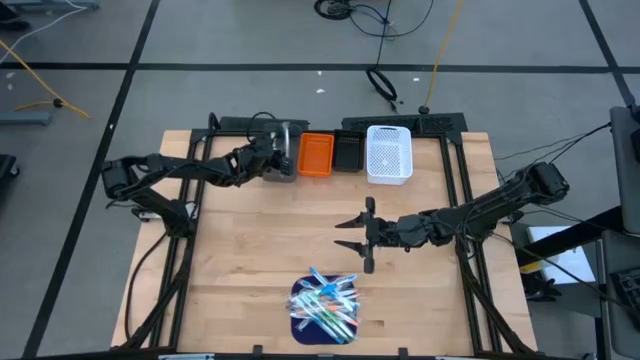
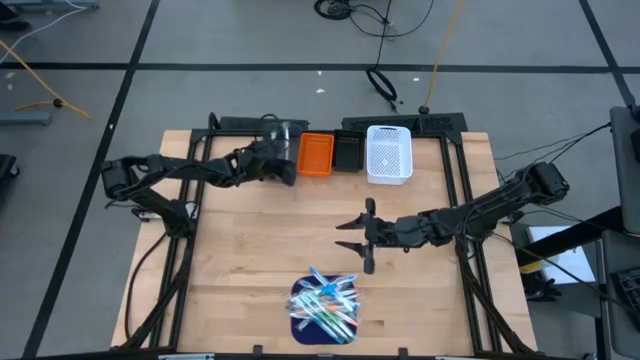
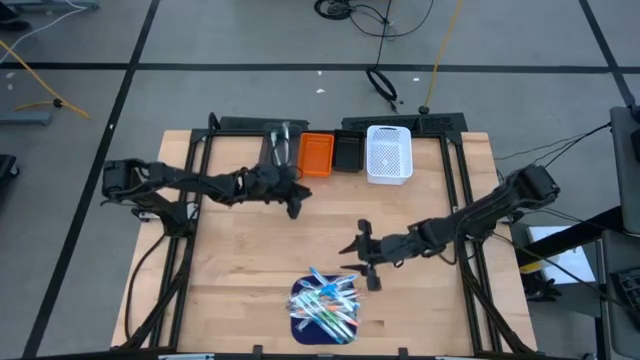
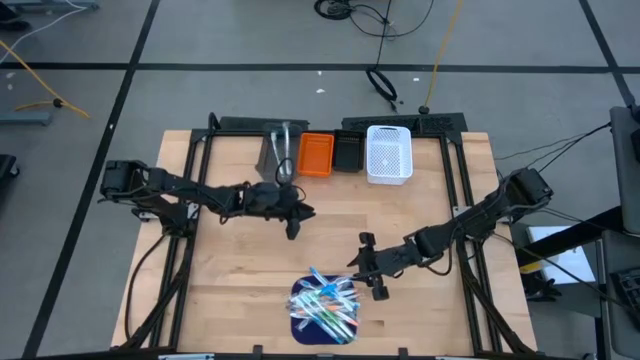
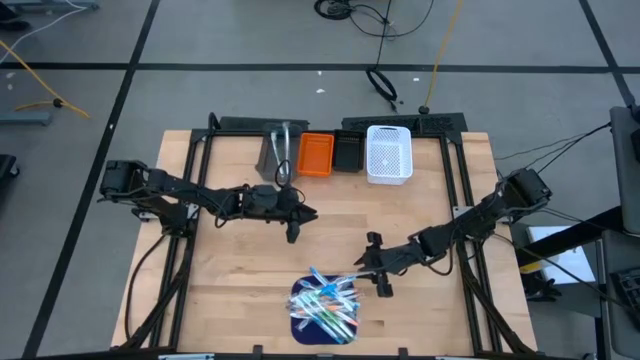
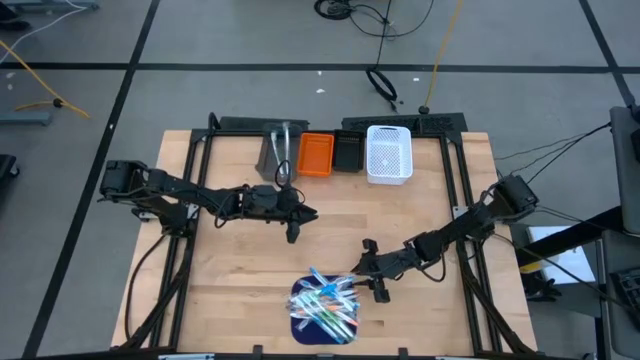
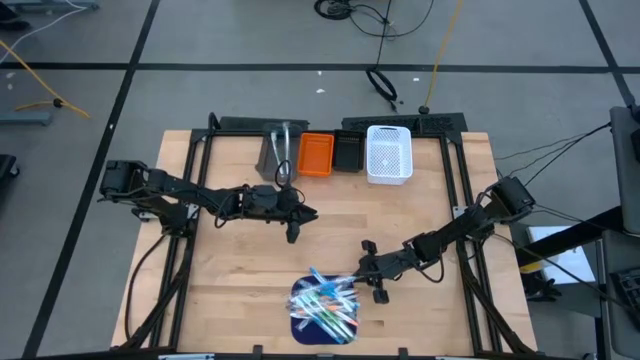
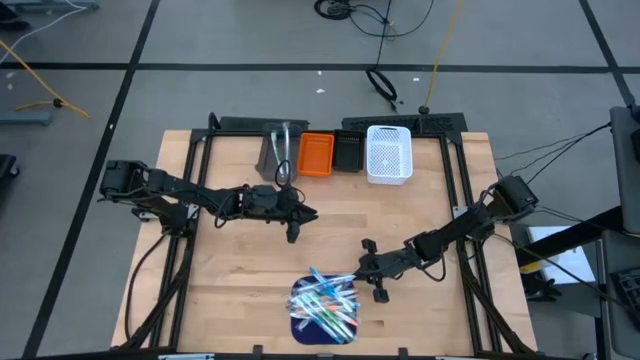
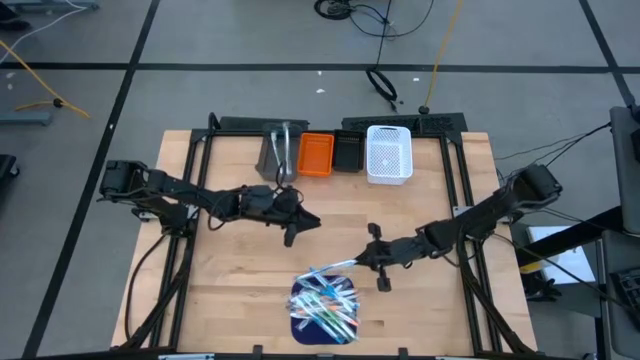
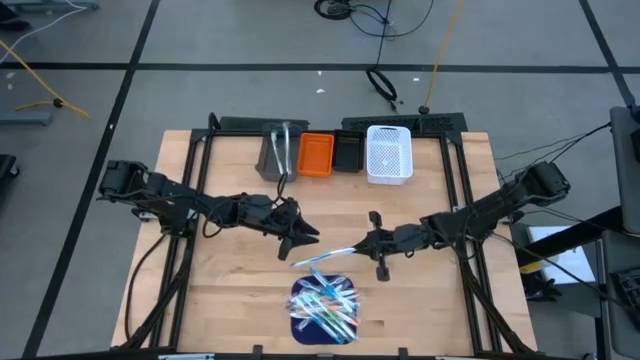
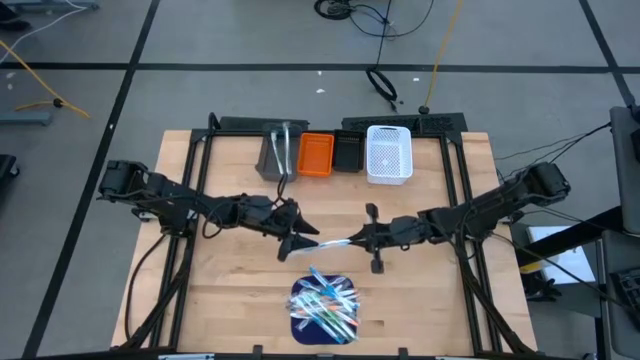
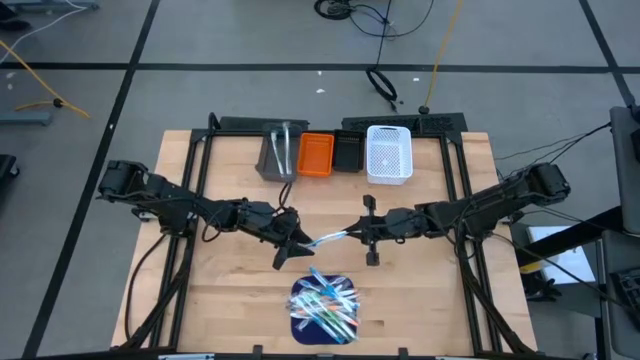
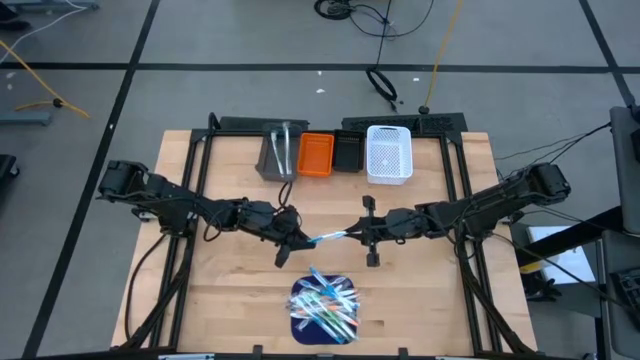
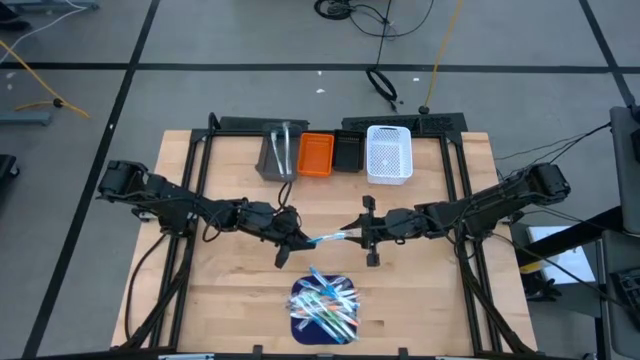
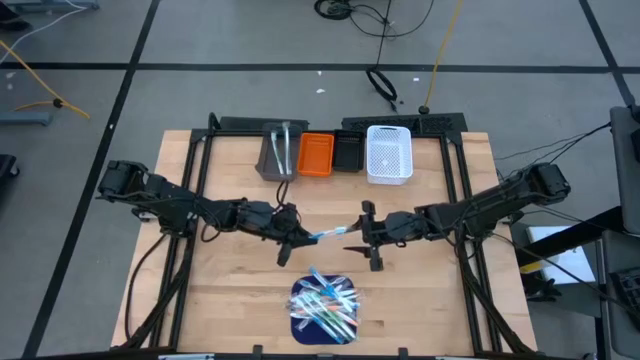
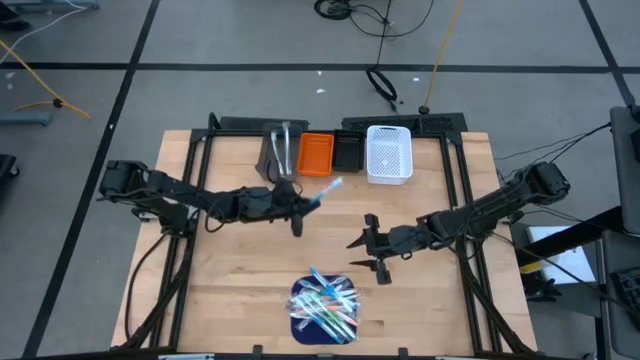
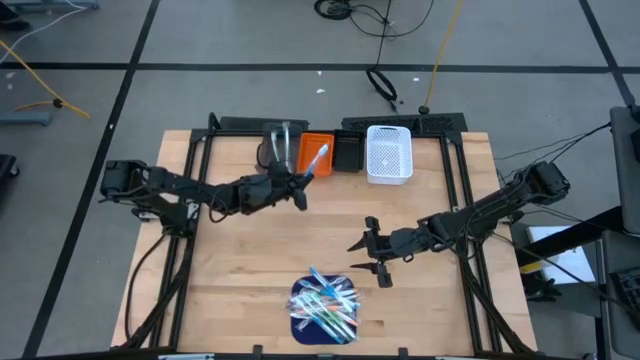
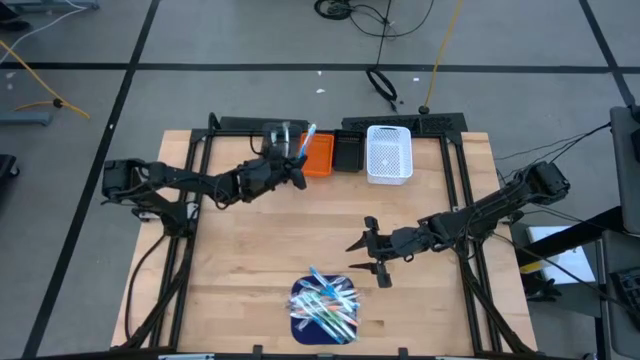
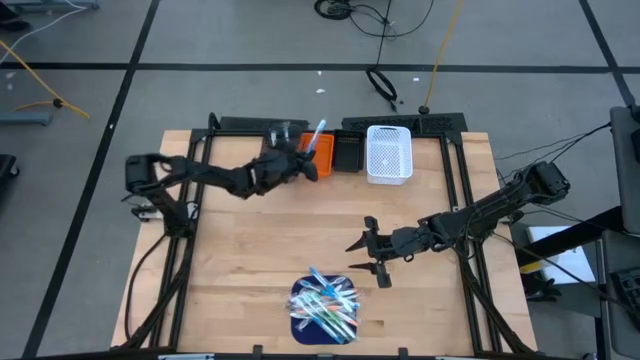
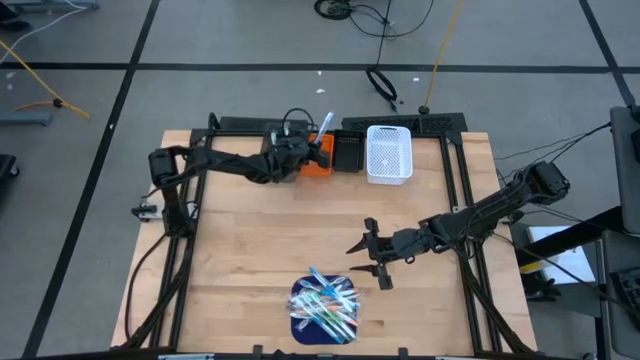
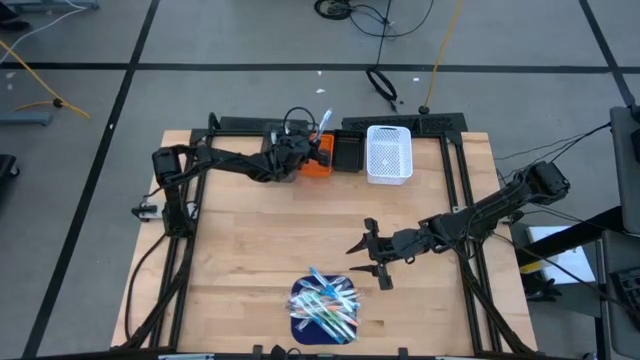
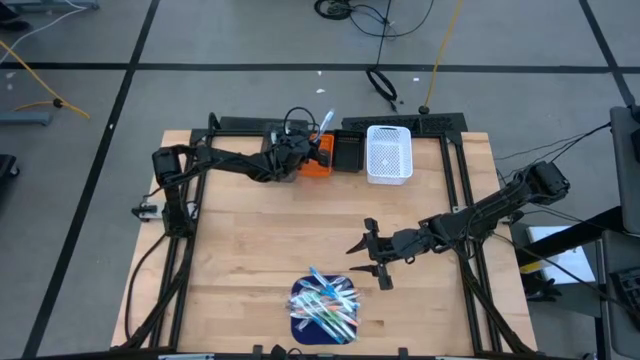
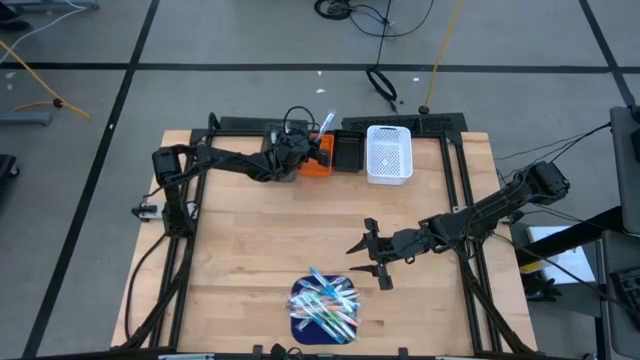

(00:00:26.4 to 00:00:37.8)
Task: Pick & Place Toothbrushes
Put the blue toothbrush into the orange bin

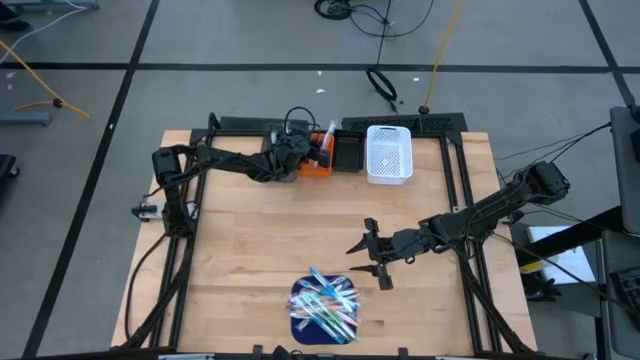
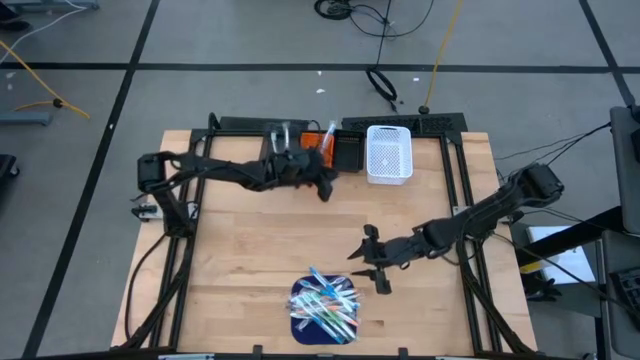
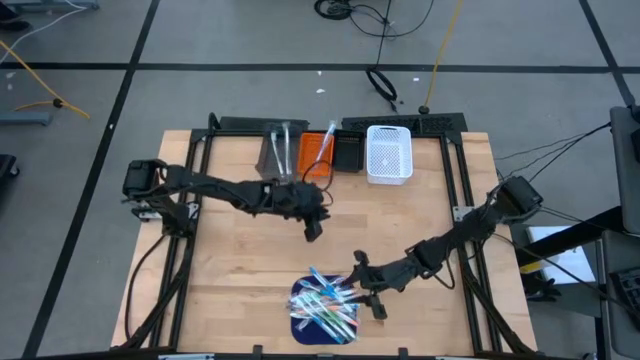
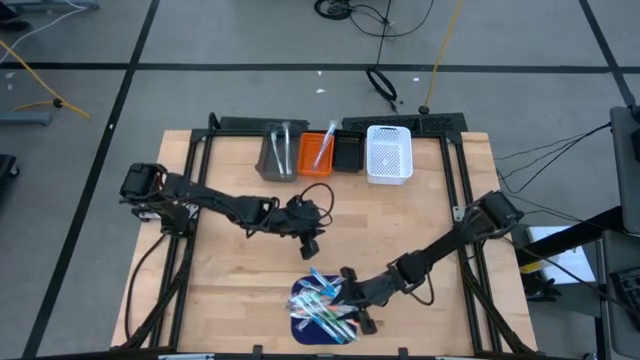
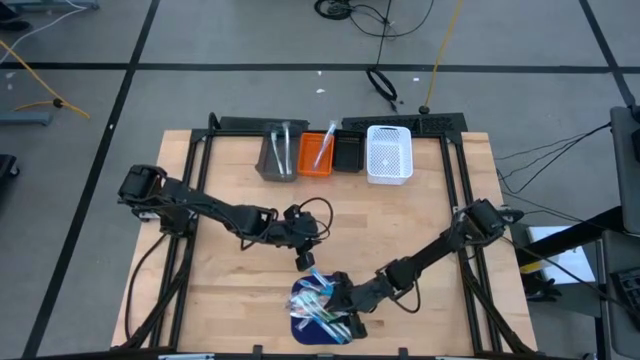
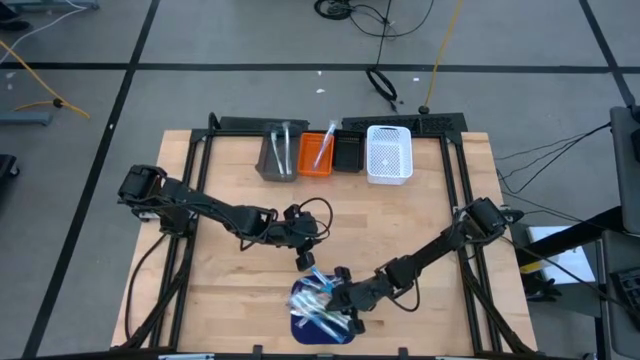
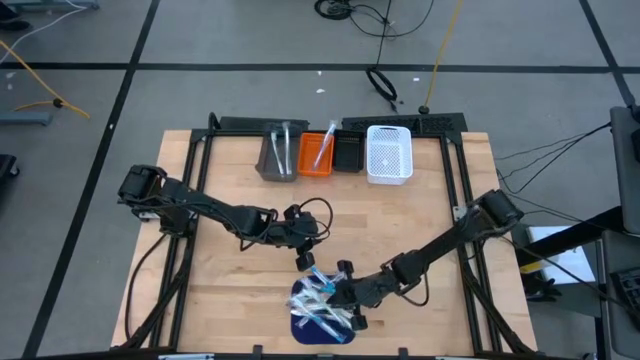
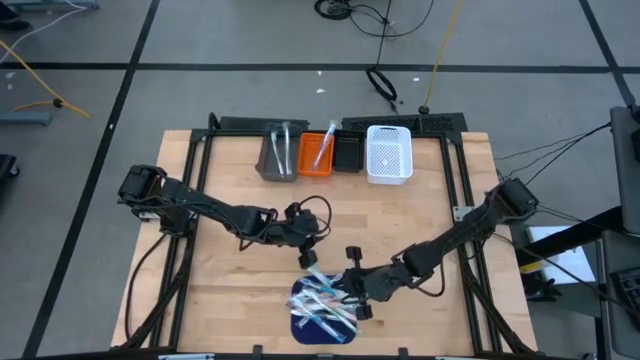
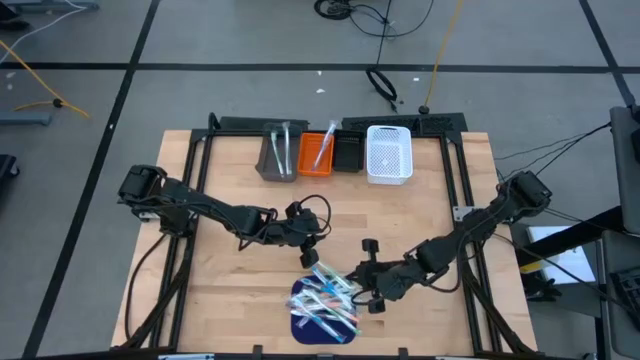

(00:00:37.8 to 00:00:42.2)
Put the green toothbrush into the light black bin

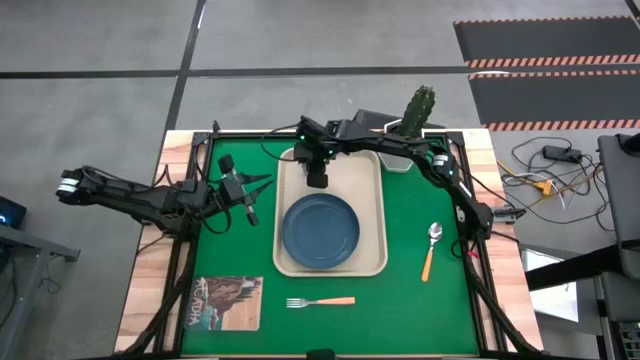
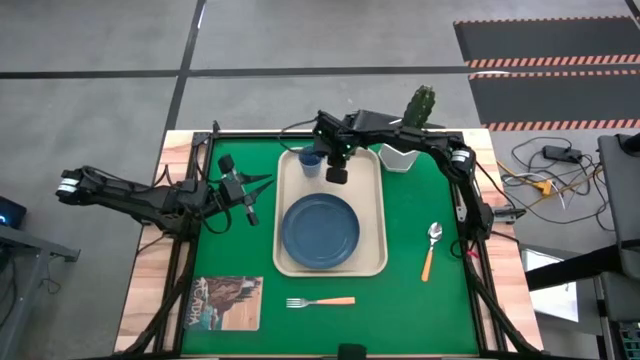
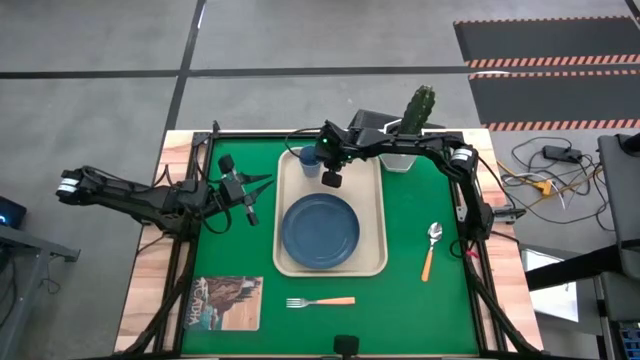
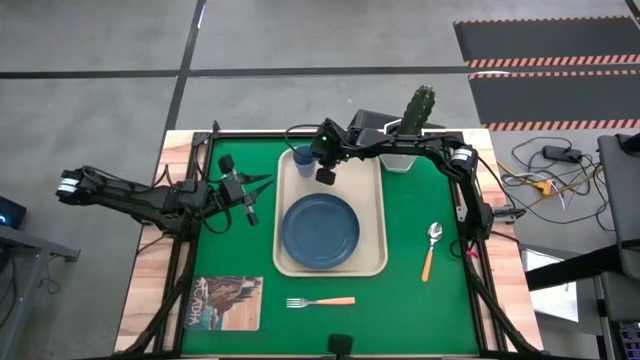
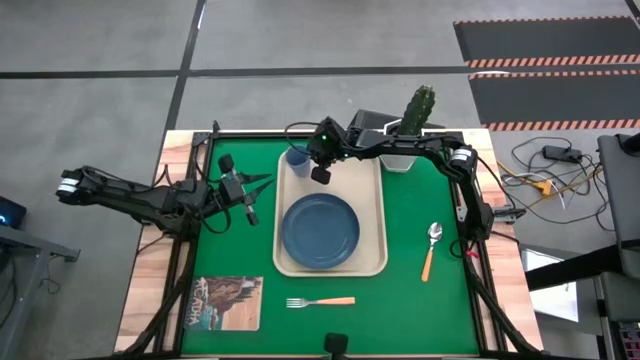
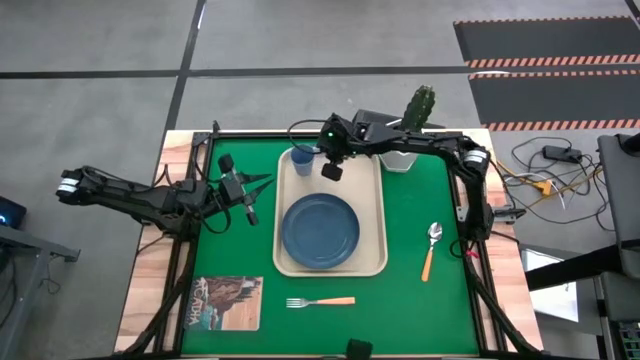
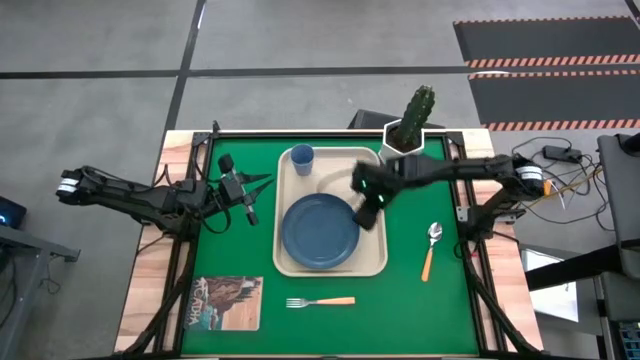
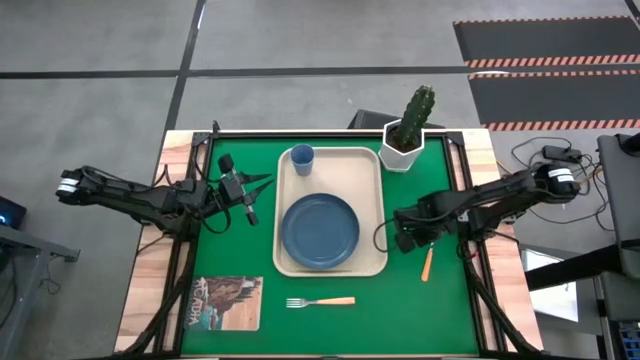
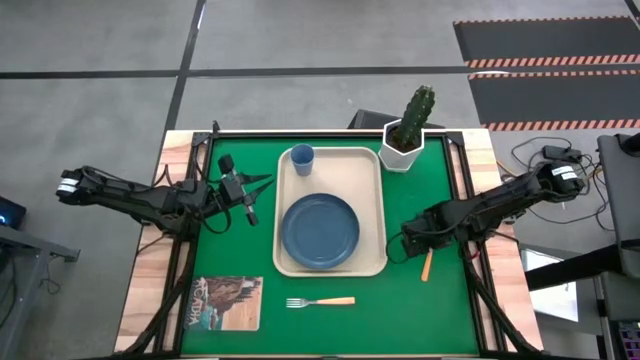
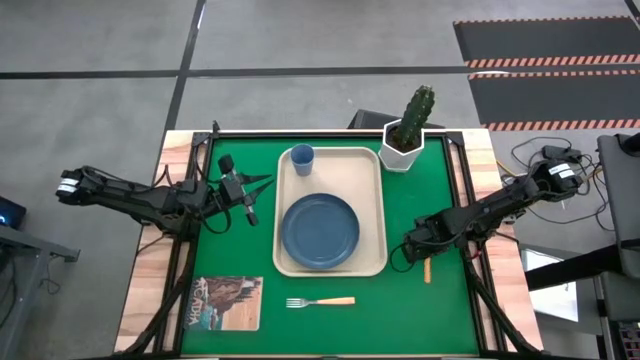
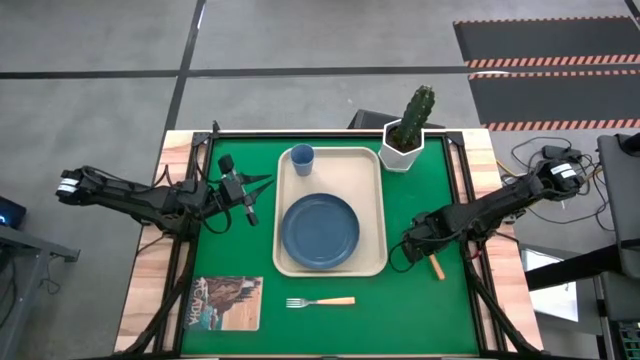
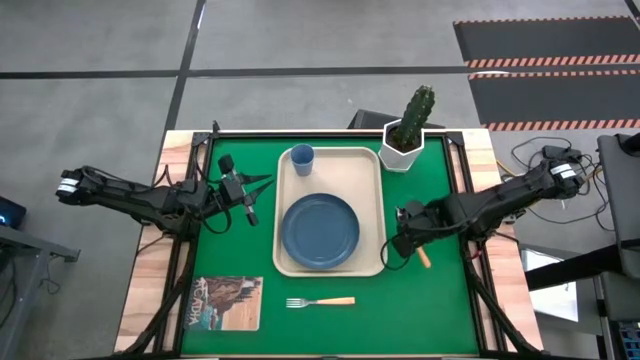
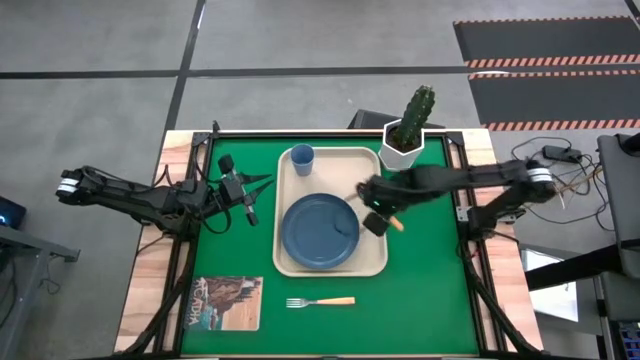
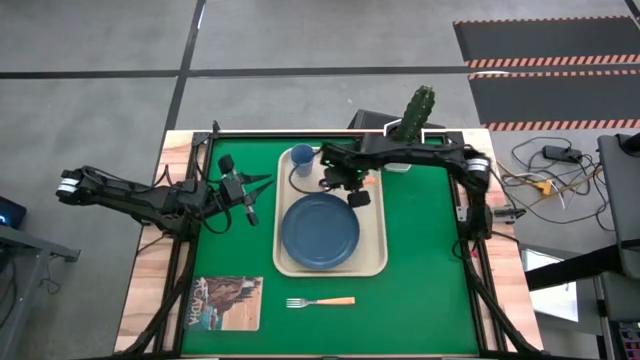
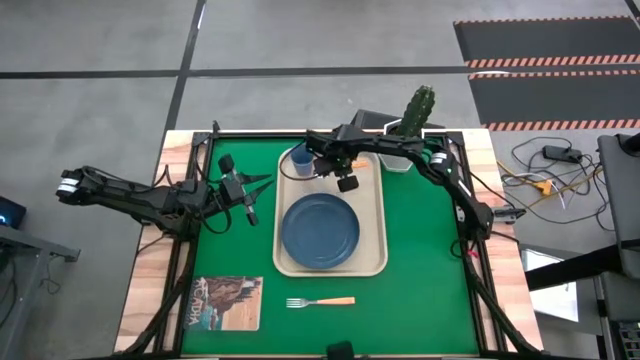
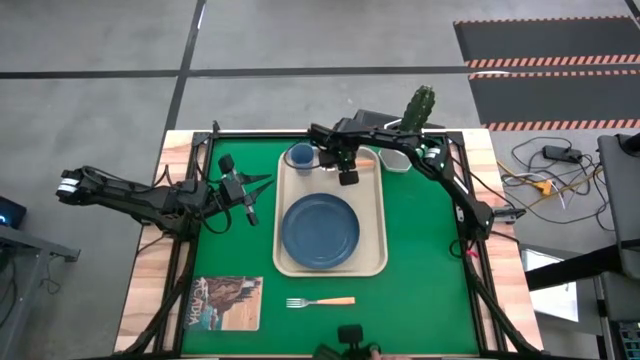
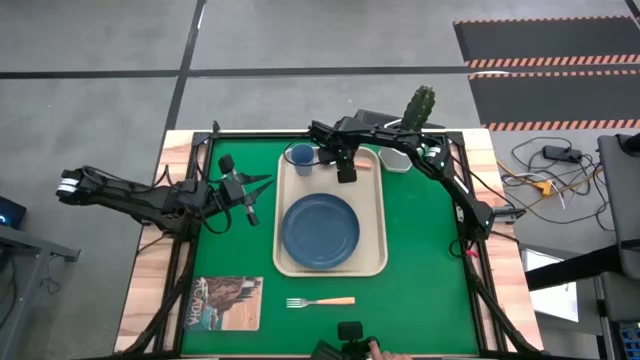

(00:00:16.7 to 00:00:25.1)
Task: Pick and place plate/cup/fork/spoon on tray
Put the orange spoon on top of the tray
